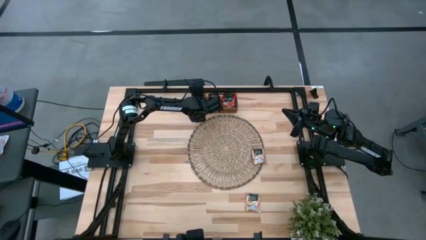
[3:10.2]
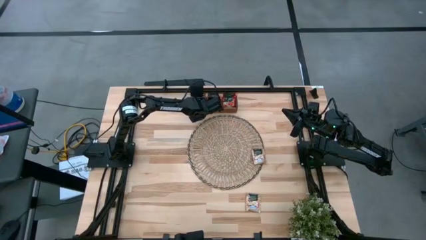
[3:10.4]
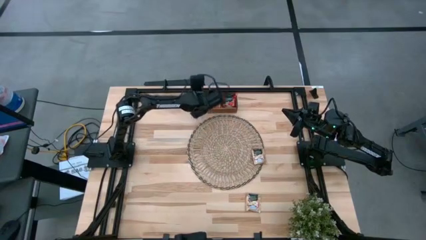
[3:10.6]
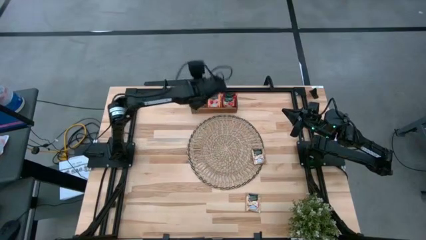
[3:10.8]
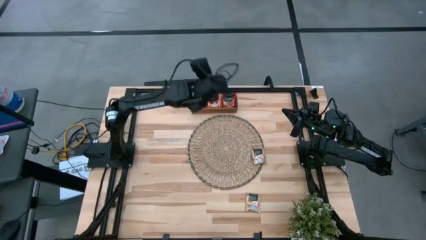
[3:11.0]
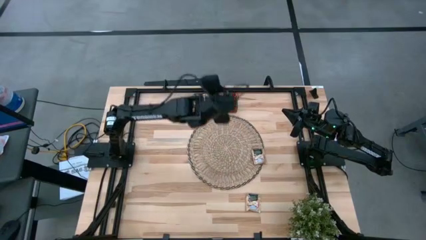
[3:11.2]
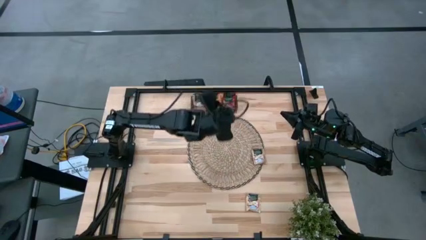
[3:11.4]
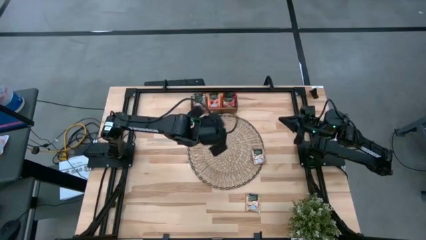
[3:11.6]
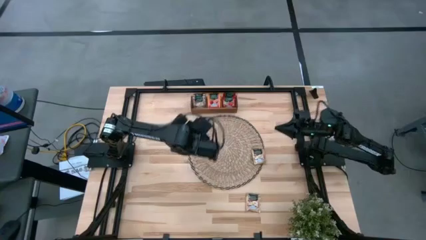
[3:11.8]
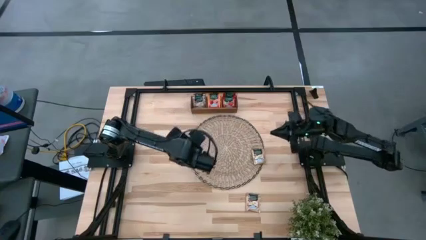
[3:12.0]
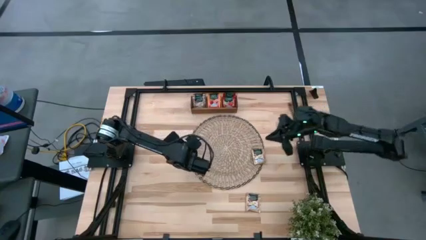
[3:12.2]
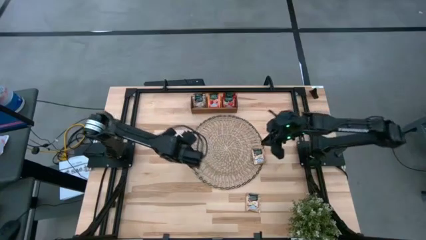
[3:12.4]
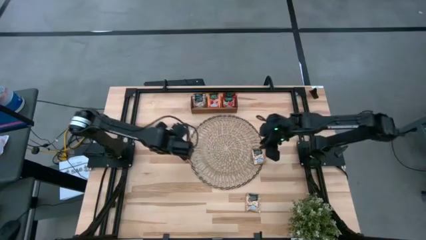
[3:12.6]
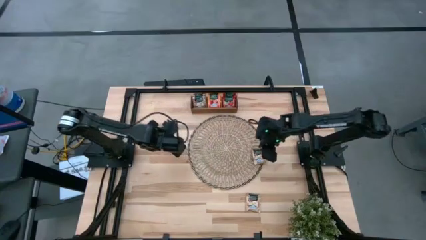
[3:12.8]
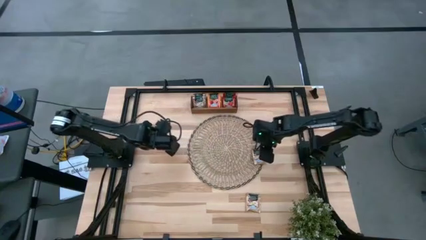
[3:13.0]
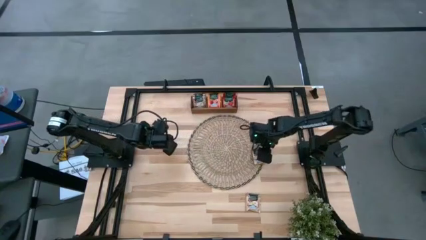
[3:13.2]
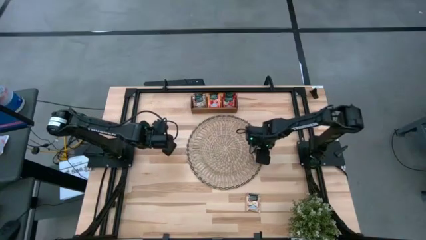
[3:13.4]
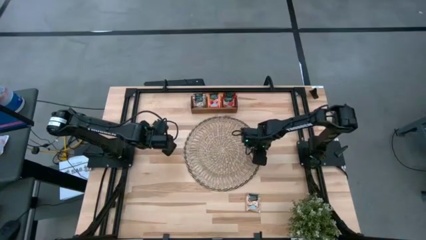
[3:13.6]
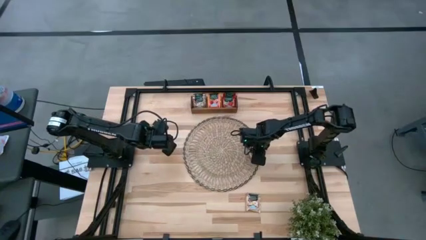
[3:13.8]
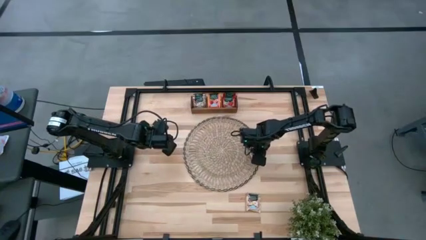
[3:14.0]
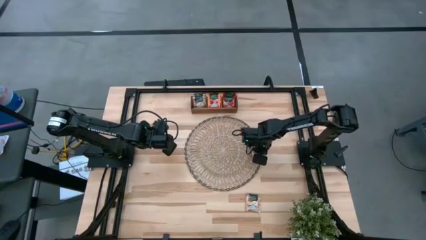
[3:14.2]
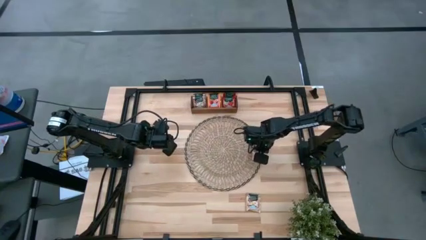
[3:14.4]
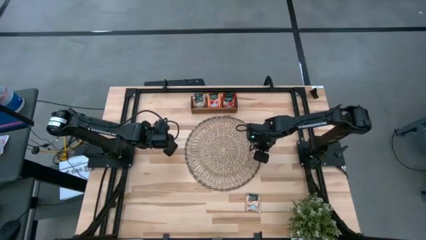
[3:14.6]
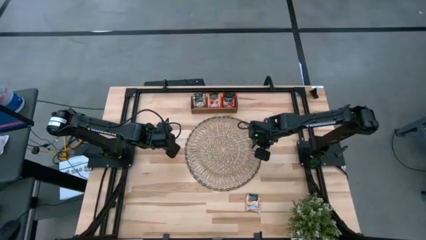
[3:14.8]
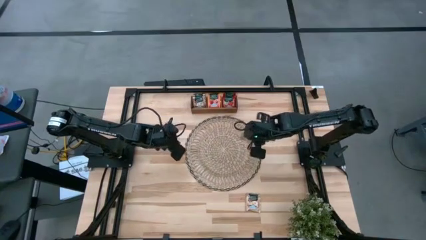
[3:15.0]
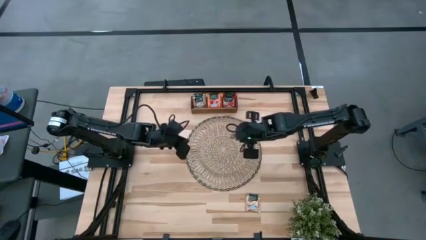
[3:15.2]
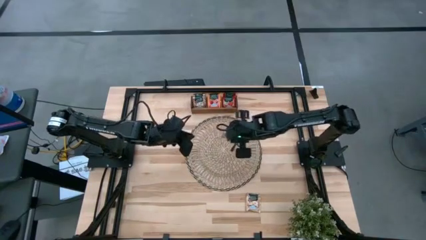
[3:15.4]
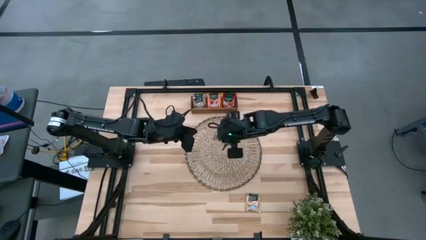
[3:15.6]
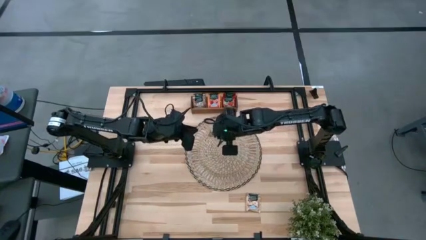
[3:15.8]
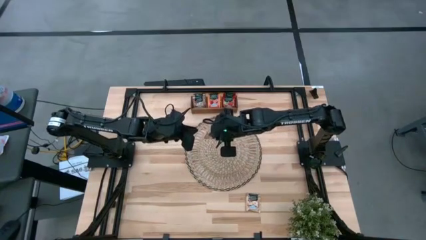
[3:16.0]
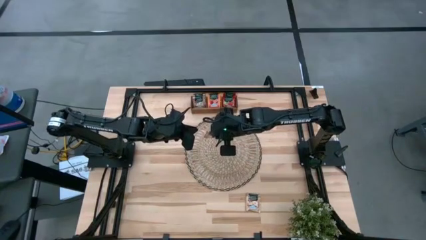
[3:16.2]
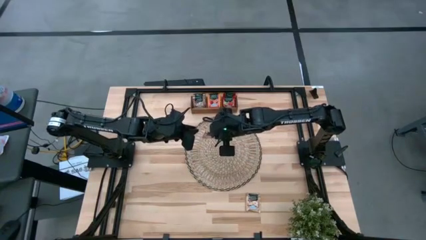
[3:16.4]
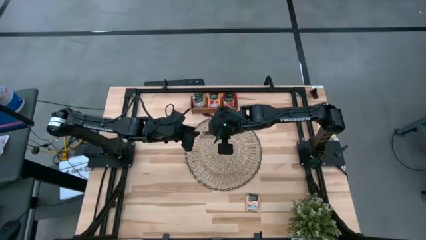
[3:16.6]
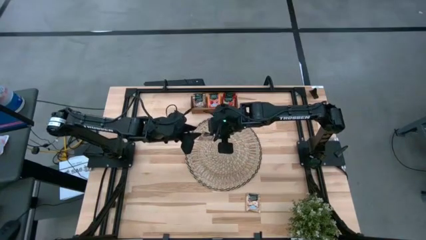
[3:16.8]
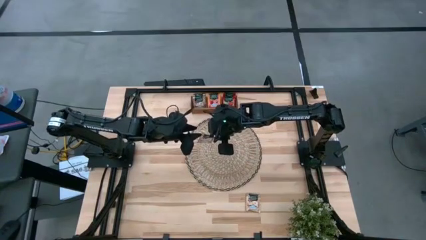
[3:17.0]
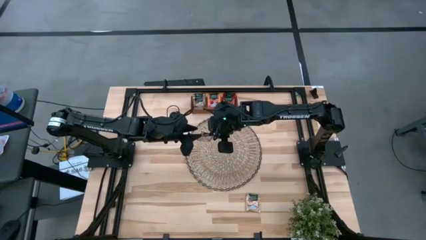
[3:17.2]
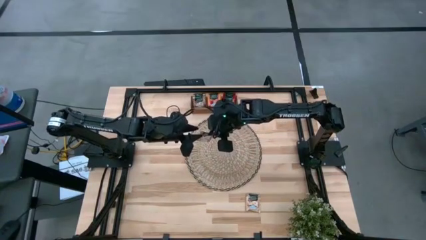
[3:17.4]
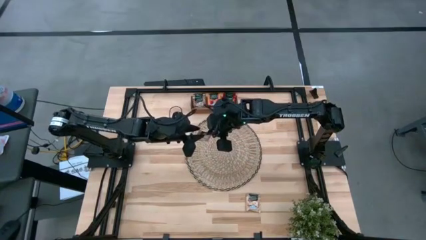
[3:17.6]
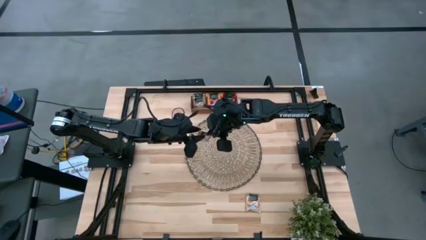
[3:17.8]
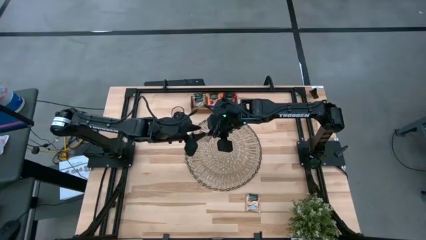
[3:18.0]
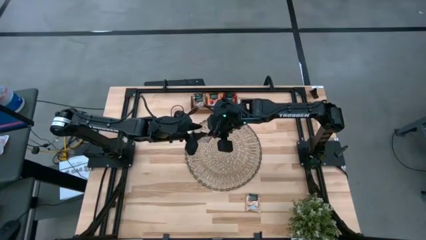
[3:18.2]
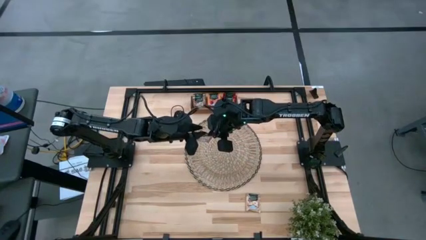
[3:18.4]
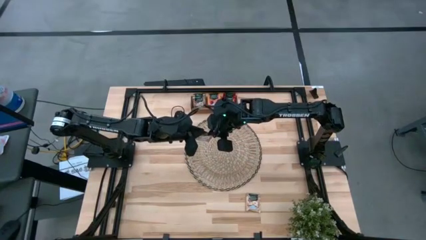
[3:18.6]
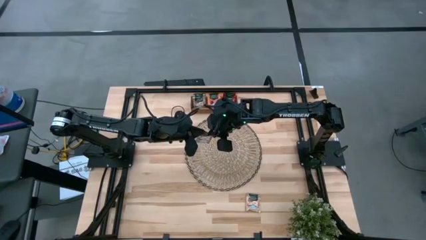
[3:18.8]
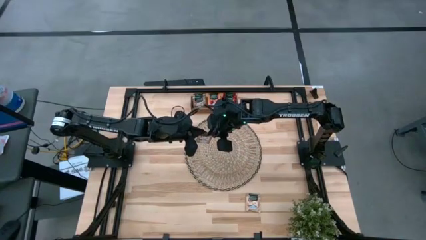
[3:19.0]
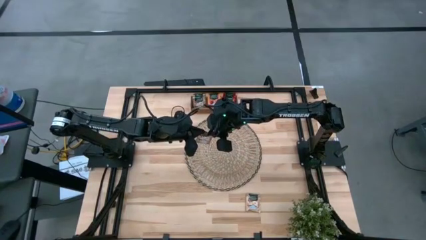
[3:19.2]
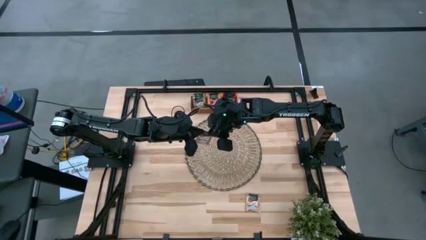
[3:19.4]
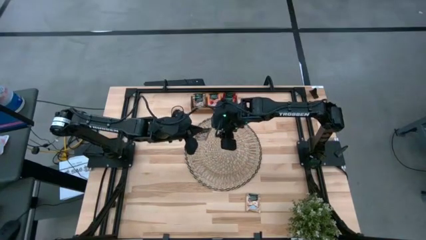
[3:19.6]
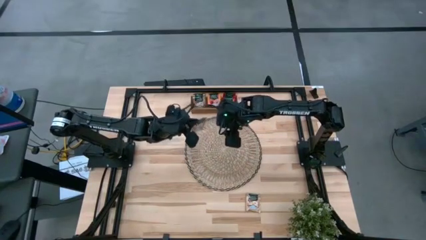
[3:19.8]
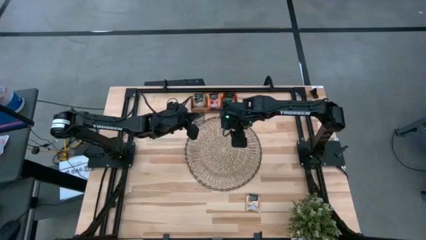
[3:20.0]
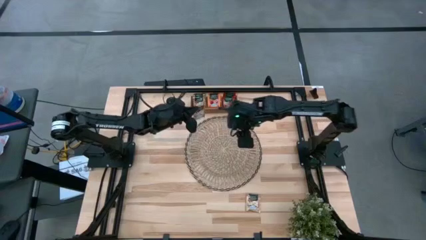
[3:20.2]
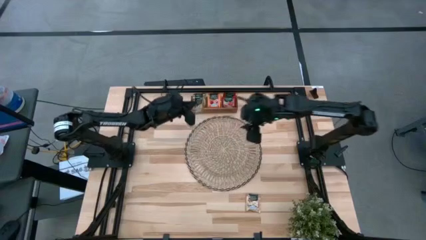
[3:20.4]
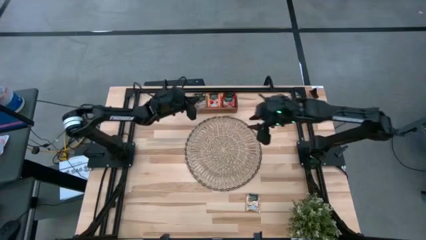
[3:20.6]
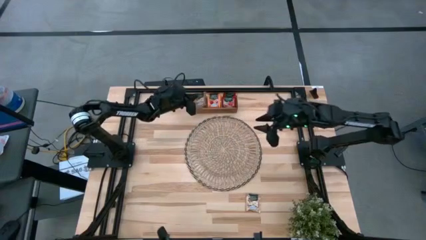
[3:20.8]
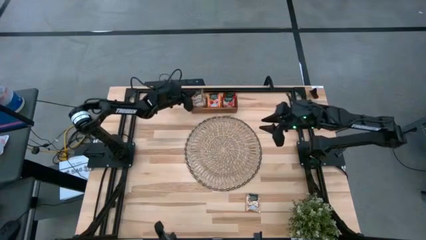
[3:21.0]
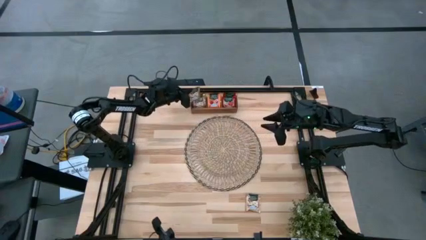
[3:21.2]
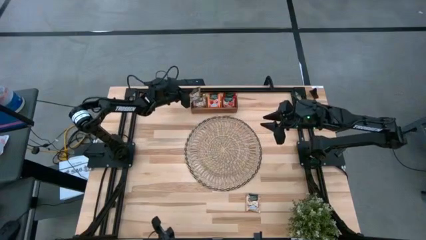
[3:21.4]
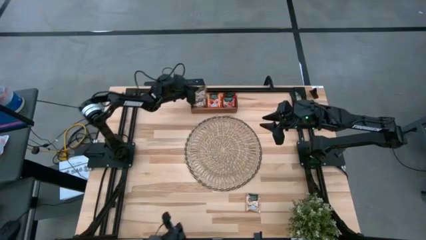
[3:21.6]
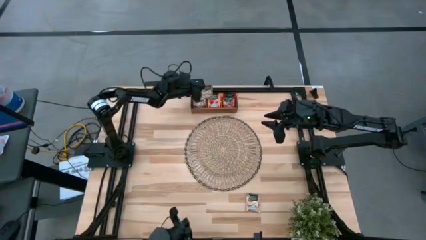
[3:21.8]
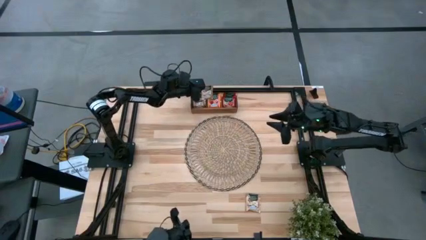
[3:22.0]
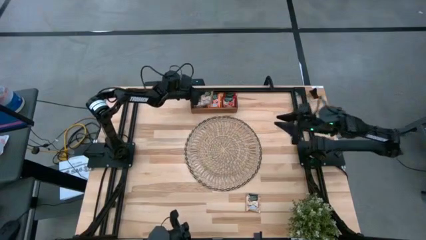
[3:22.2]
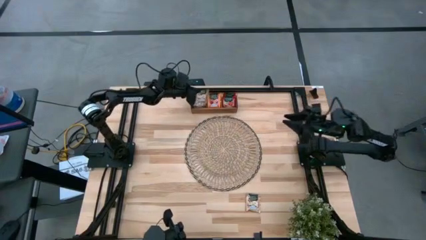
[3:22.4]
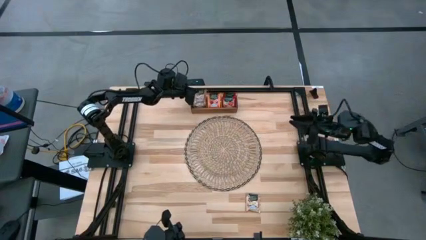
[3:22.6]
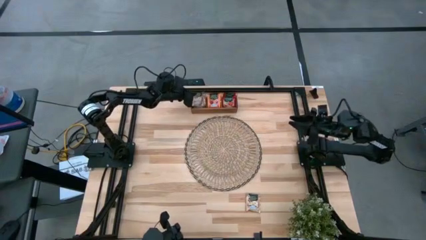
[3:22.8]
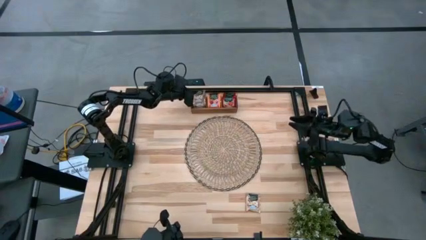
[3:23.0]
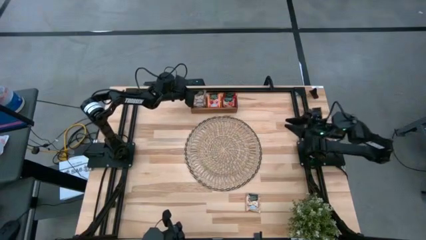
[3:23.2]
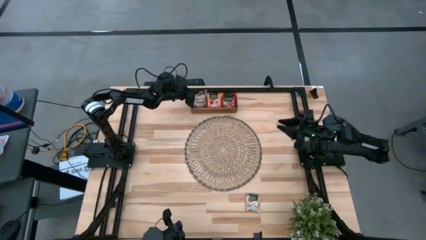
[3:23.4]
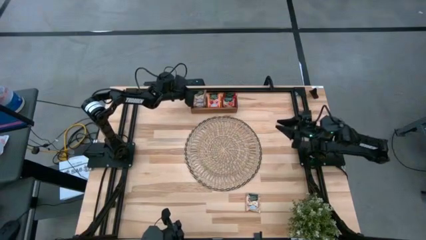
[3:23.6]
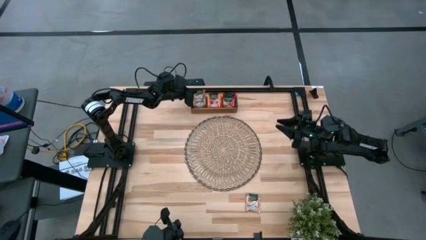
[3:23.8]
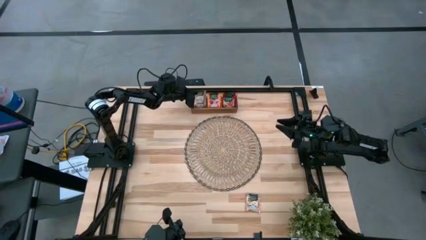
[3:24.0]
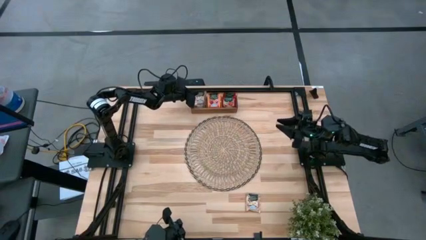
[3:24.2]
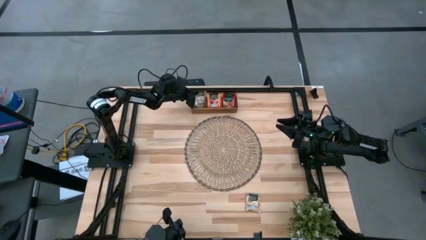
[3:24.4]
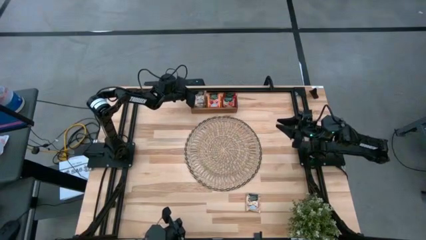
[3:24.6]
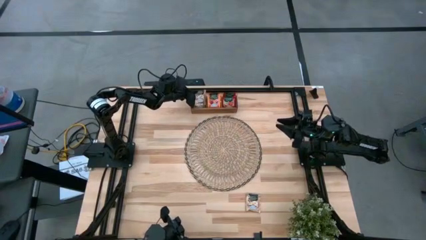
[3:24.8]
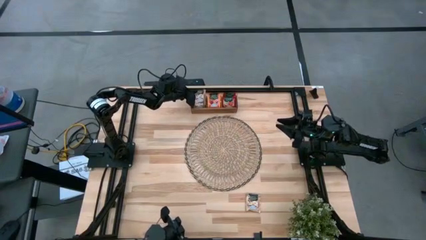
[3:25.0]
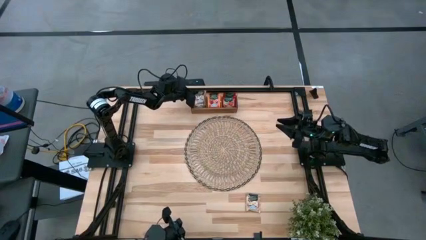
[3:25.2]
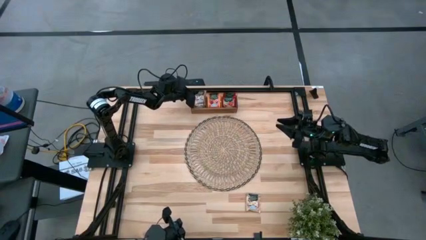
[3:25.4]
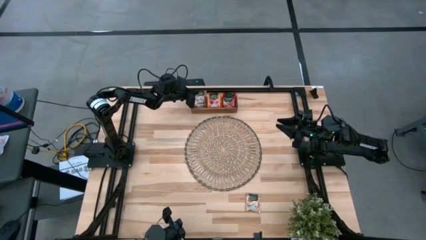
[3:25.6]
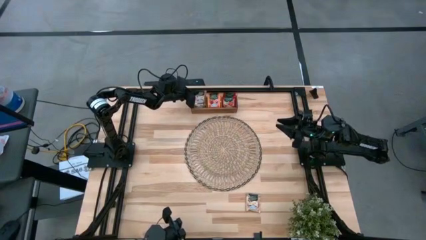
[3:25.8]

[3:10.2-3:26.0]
Task: Pick & Place Tea
Put the brown tea bag into the left section of the wooden organizer
